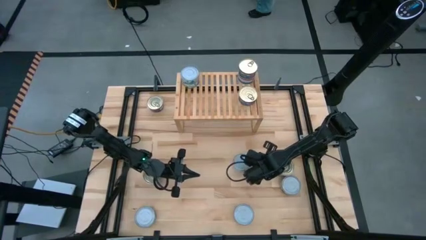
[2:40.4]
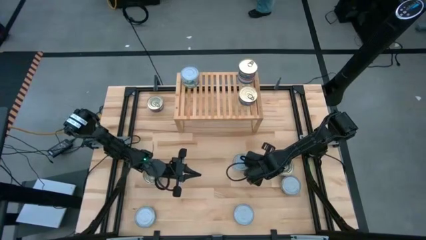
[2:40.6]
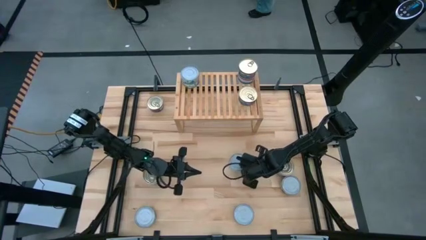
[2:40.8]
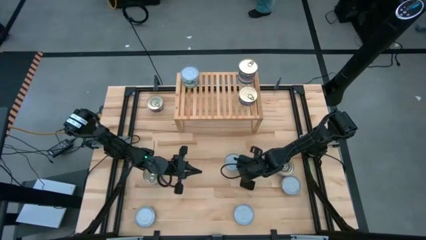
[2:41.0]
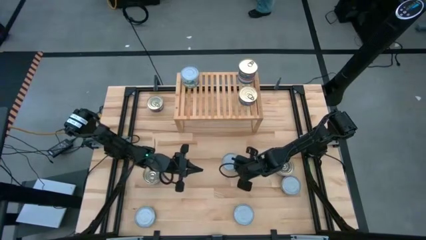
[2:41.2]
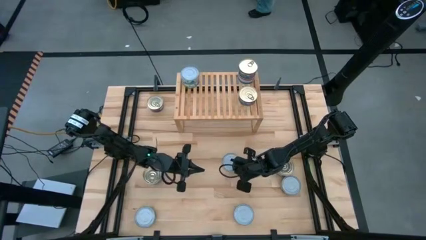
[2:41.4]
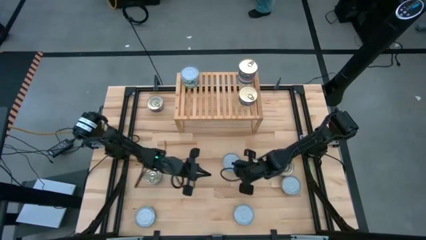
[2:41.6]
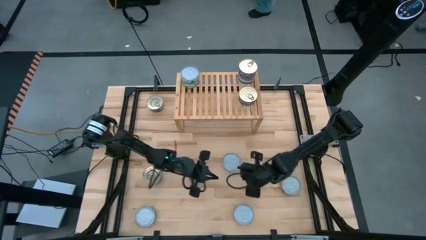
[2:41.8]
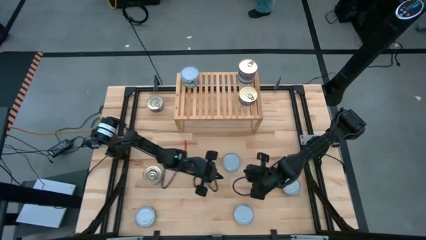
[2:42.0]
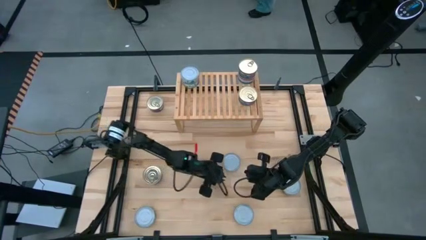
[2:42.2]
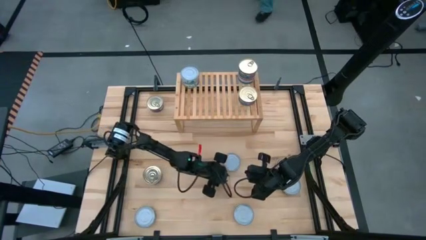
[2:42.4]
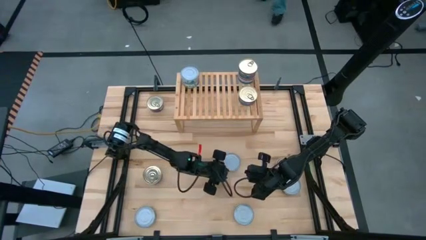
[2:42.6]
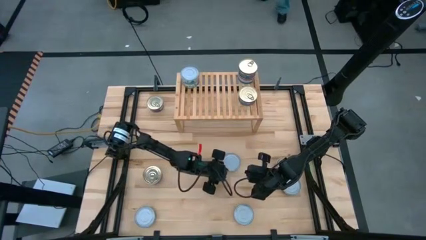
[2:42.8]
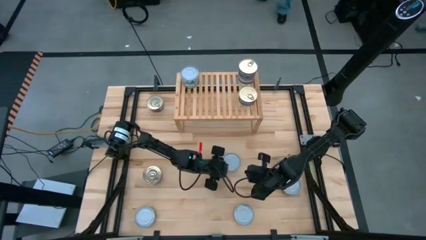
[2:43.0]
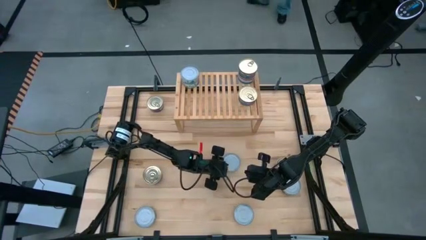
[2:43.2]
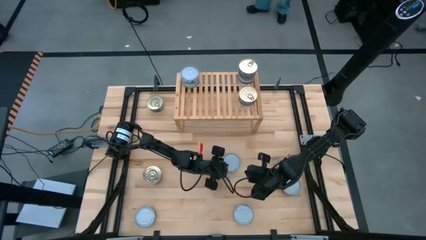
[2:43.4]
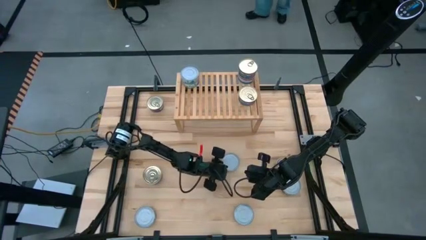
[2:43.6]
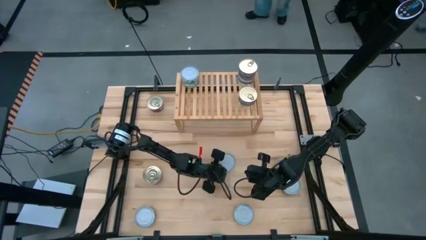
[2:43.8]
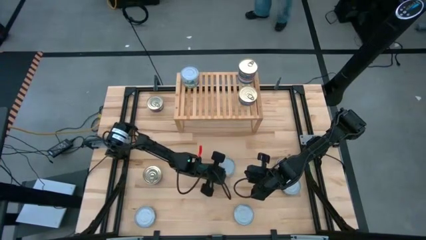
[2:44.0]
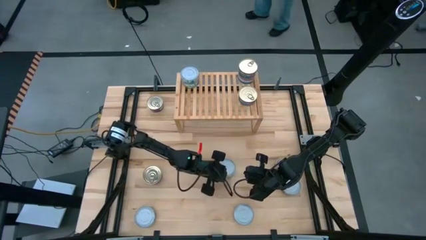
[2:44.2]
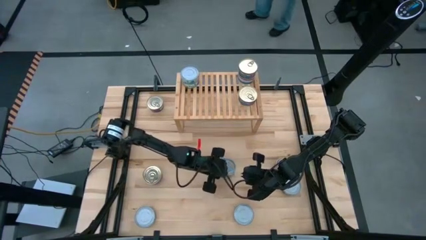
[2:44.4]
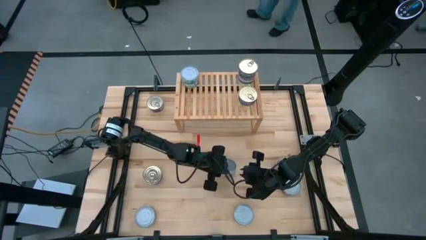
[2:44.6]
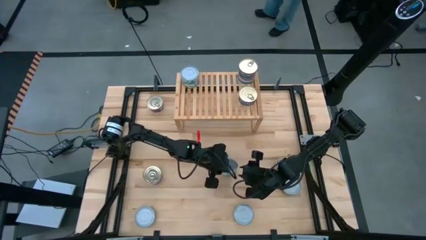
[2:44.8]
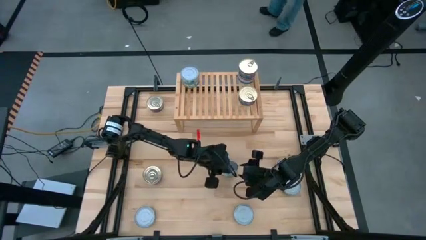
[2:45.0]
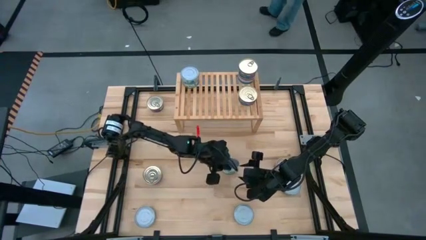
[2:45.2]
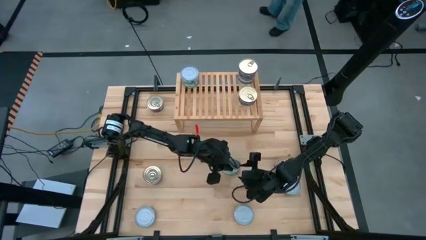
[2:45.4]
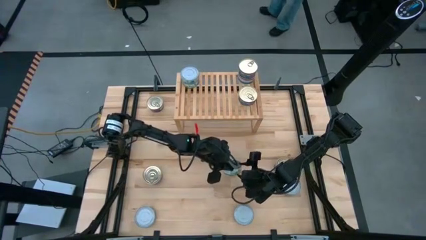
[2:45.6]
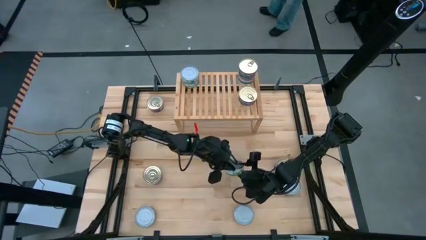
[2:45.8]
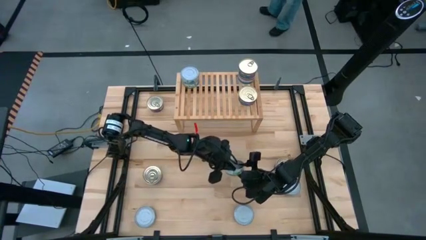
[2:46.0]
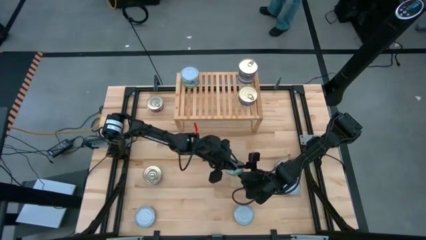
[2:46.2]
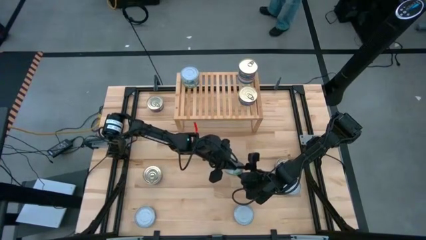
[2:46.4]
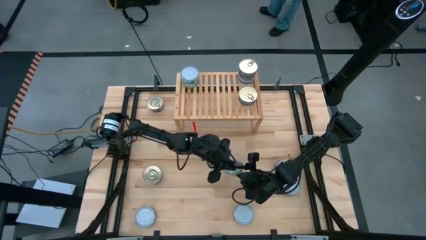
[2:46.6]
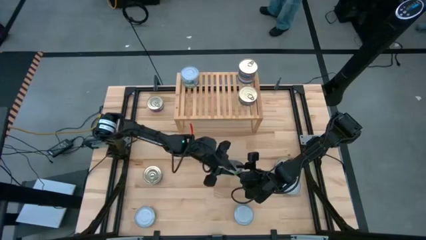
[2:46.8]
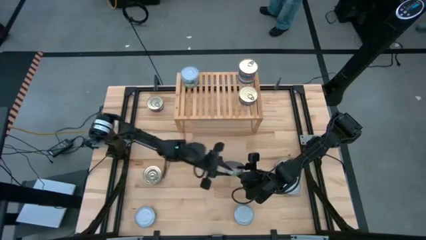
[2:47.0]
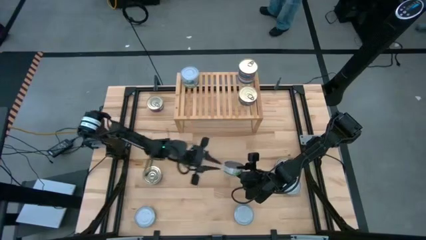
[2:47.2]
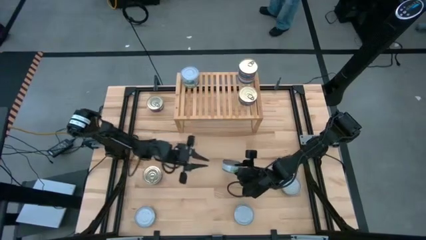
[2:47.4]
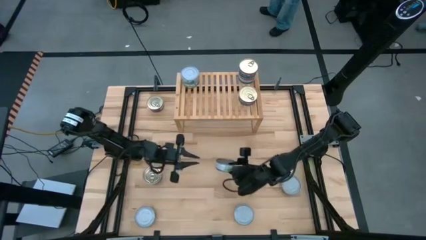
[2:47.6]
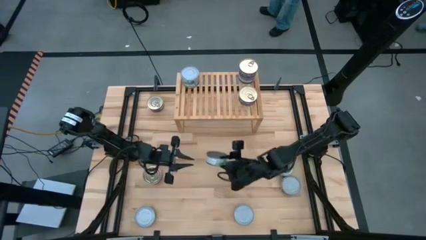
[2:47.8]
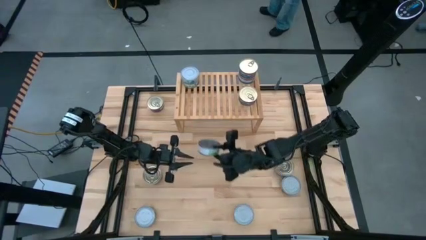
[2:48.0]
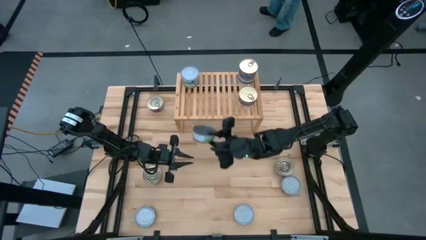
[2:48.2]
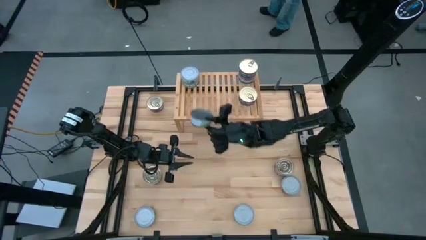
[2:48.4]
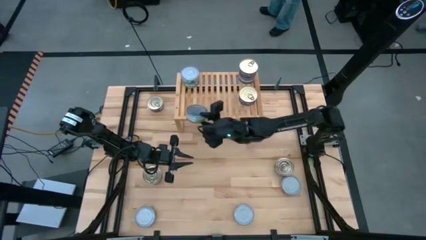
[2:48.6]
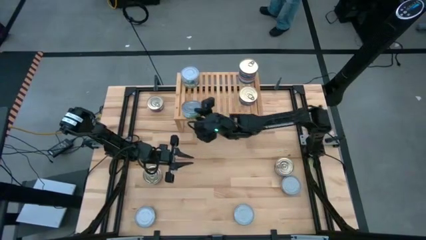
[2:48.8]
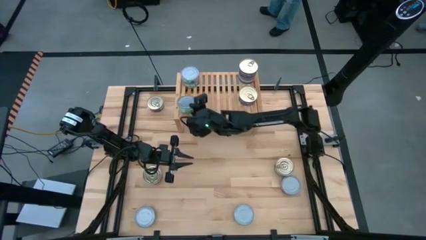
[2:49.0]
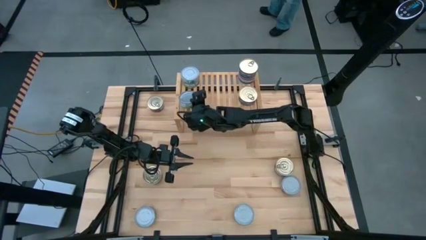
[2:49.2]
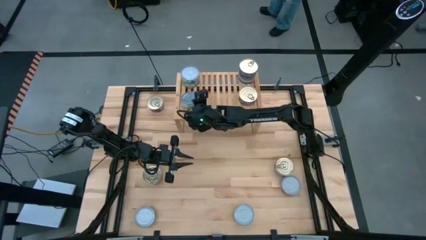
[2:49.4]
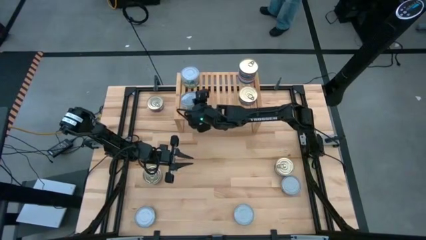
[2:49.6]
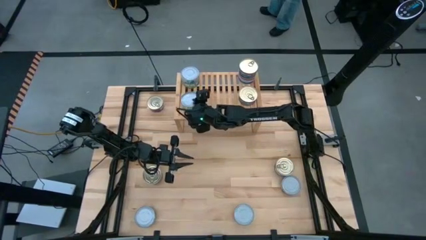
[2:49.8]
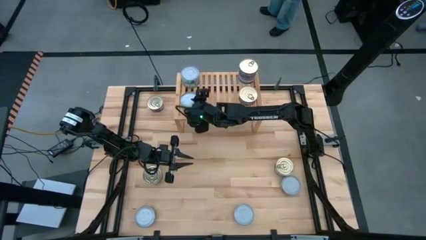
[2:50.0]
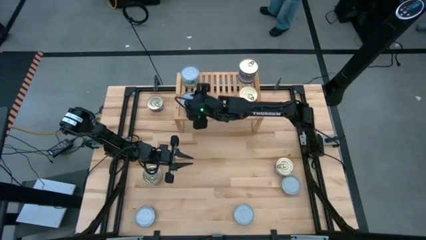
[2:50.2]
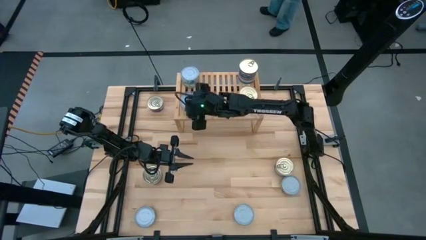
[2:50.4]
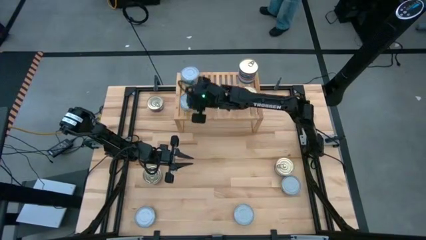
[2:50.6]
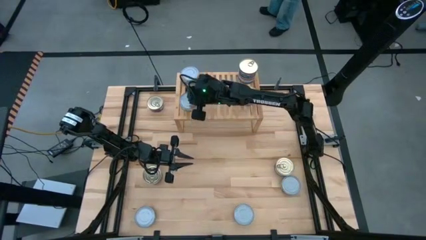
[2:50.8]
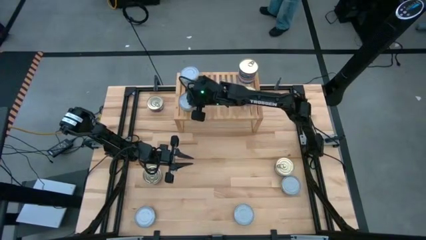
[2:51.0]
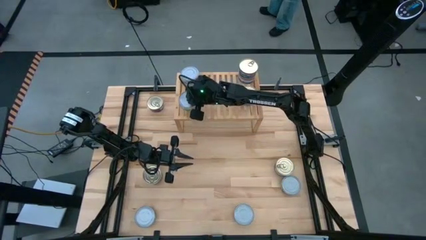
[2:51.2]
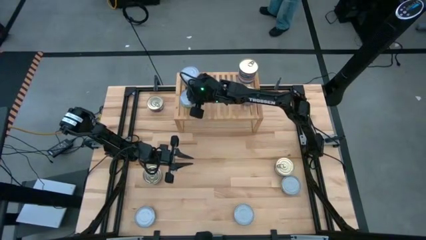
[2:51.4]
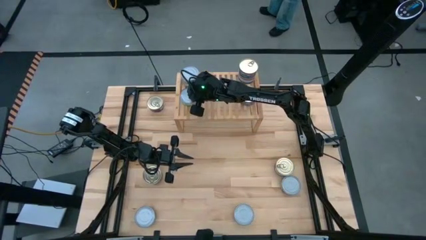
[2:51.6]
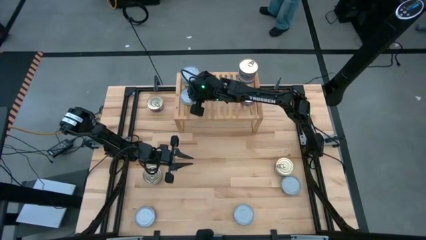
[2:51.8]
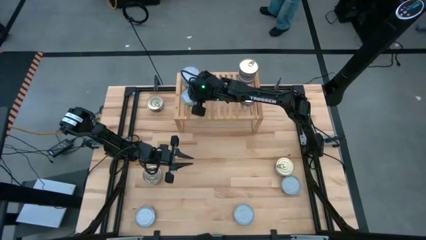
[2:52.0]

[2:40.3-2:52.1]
Task: Stack canned seafood by type on shelf
Put the green tuna can on the shelf

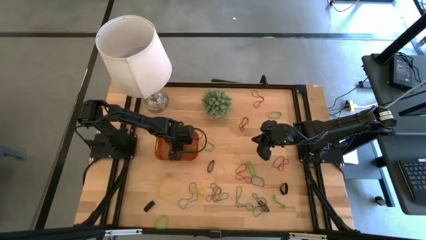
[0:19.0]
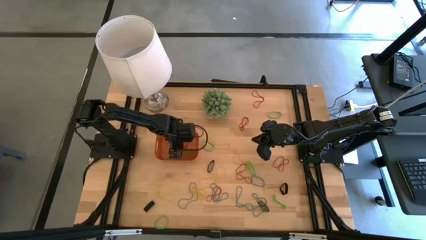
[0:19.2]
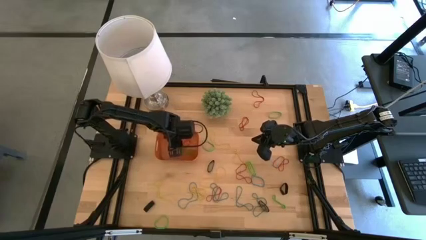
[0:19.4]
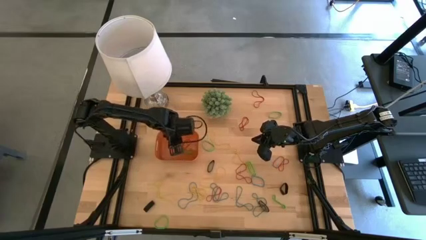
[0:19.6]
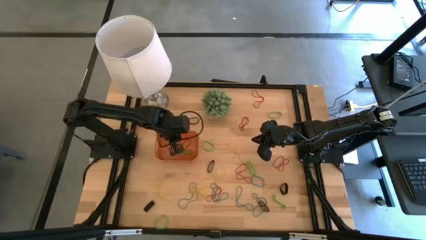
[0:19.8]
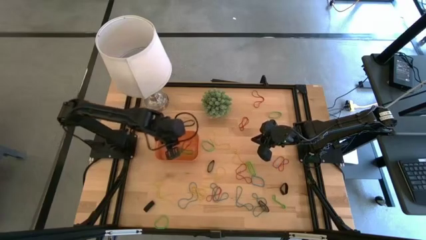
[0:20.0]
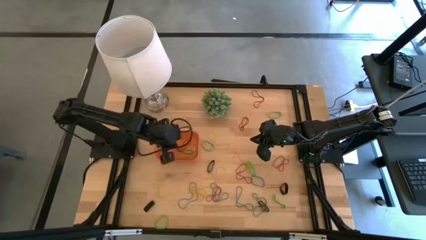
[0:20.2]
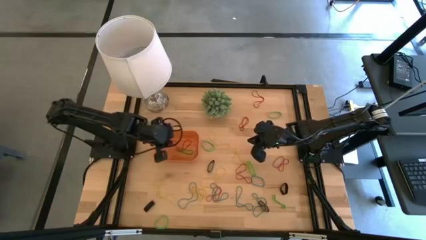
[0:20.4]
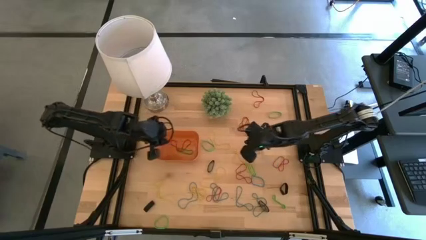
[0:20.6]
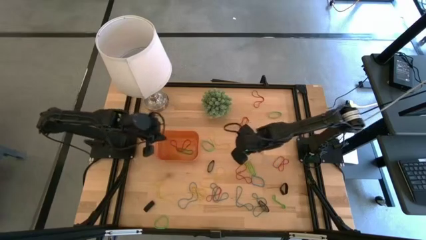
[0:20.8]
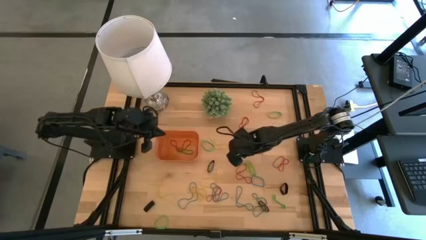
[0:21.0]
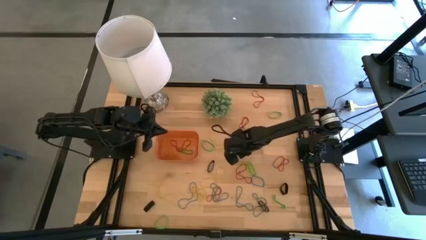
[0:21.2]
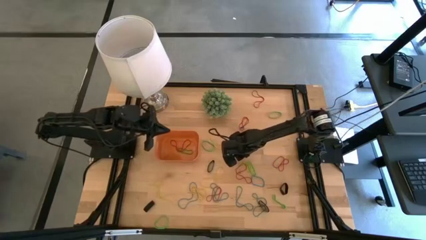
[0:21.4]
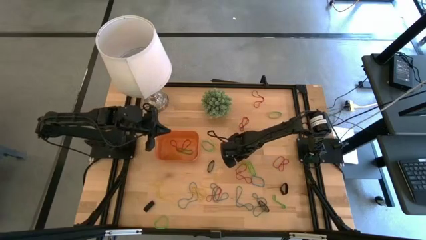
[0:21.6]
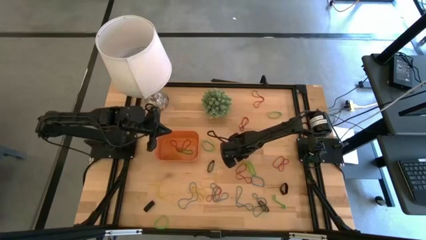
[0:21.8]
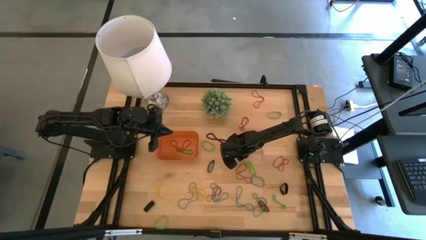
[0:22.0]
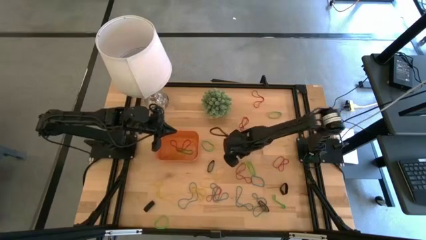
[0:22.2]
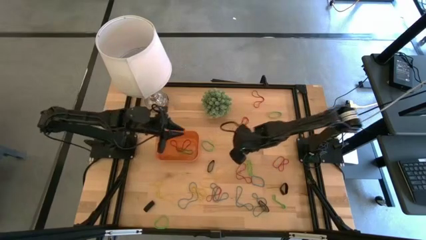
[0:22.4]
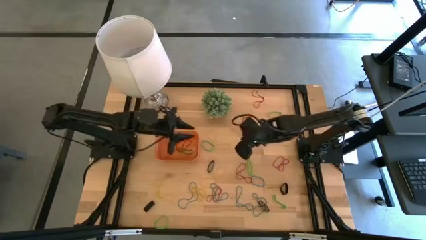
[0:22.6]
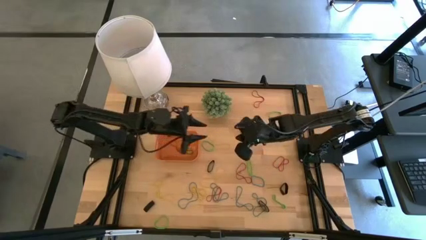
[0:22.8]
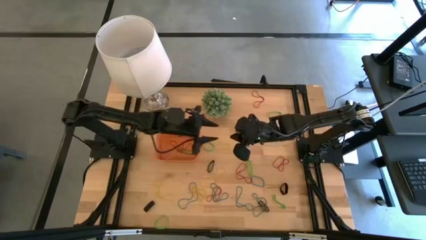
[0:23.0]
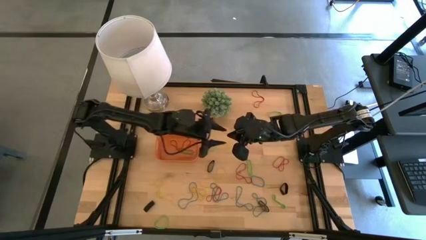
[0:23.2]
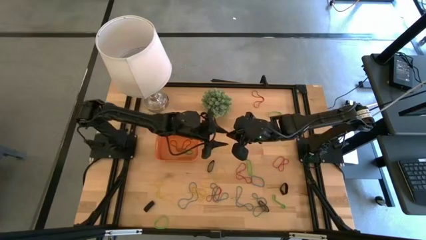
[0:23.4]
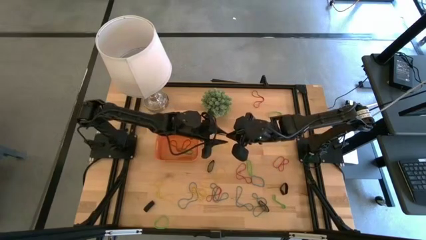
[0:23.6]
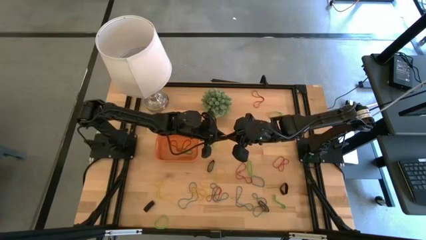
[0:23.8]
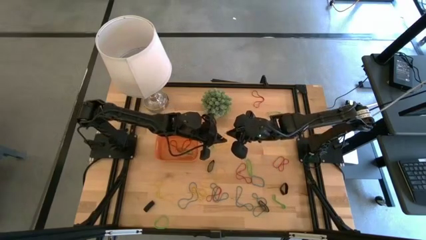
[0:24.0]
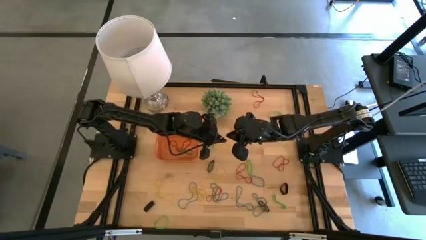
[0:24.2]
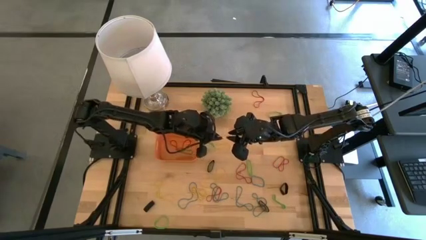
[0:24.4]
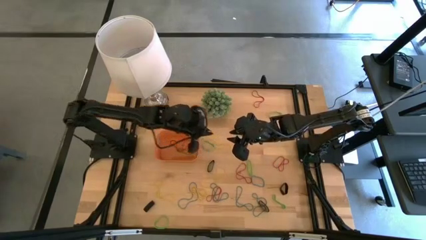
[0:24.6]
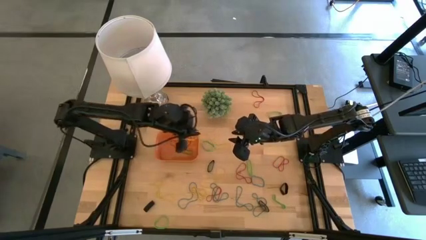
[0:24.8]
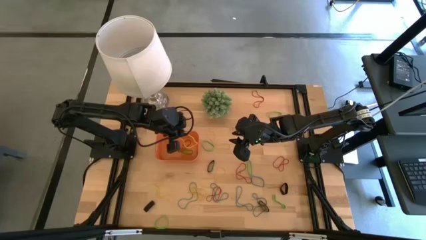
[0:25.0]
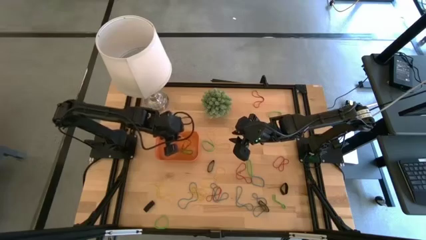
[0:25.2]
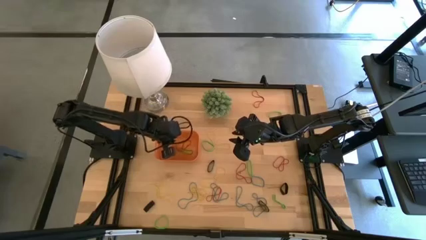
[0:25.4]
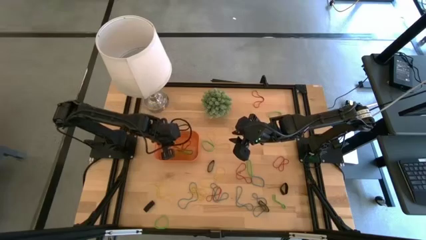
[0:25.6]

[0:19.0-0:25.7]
Task: Pick and place rubber bands into bin
Put the yellow rubber band into the orange bin
